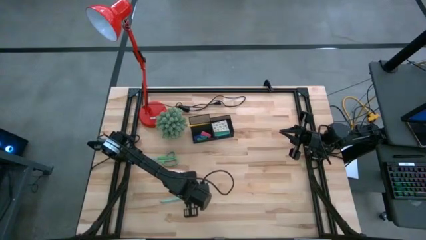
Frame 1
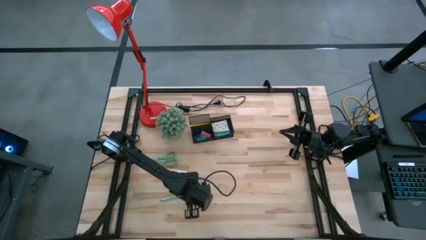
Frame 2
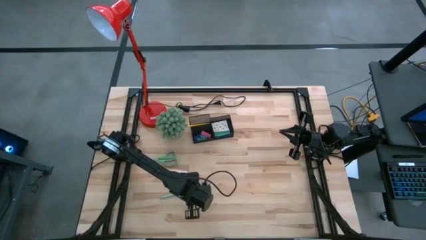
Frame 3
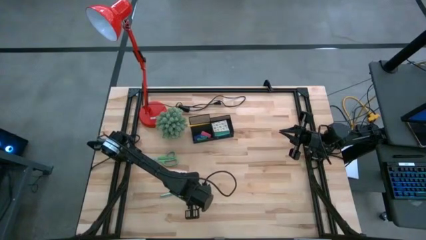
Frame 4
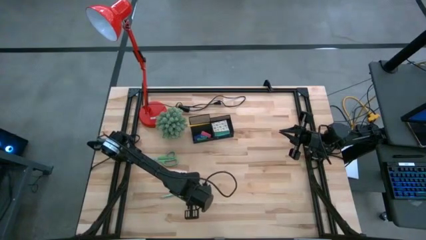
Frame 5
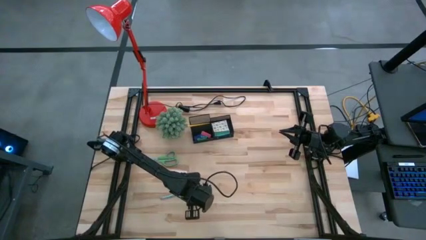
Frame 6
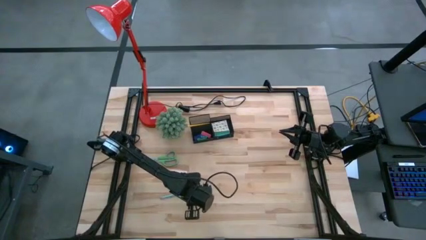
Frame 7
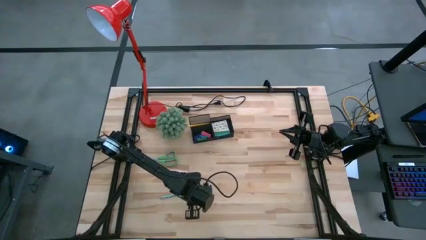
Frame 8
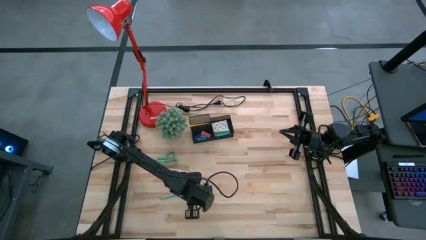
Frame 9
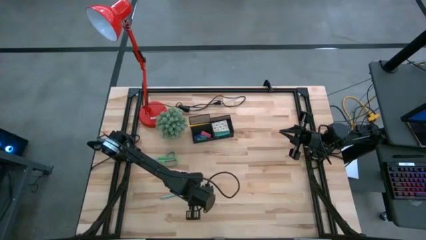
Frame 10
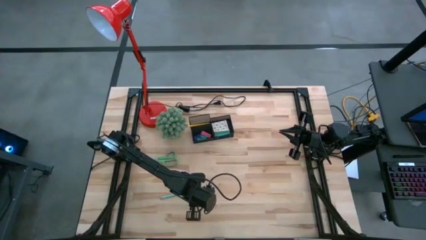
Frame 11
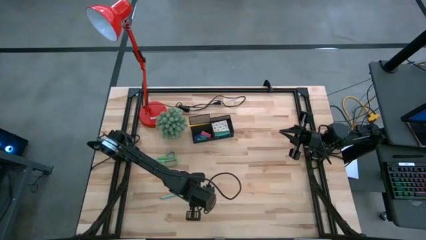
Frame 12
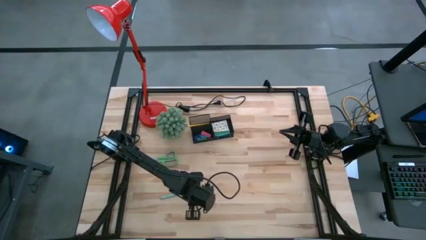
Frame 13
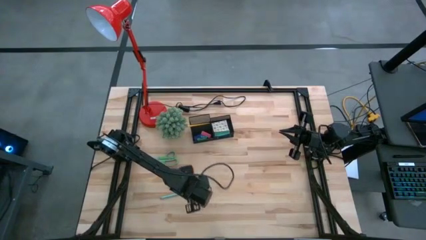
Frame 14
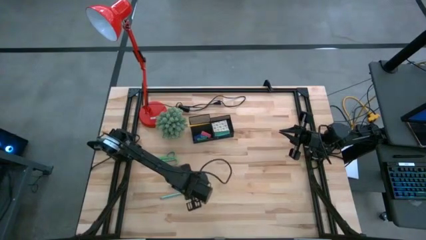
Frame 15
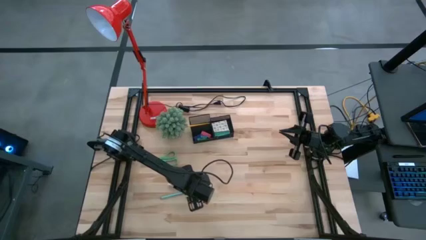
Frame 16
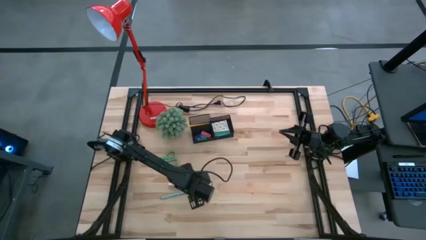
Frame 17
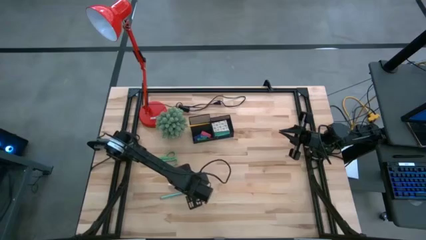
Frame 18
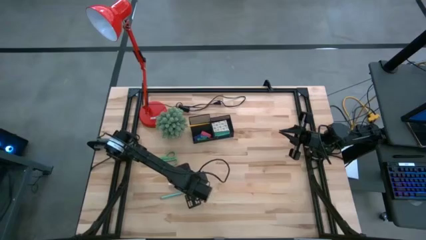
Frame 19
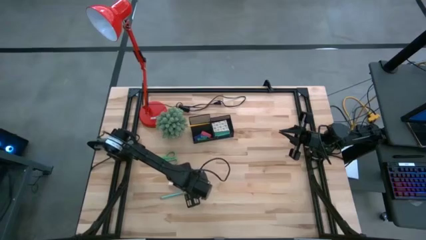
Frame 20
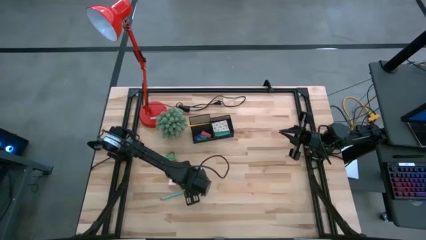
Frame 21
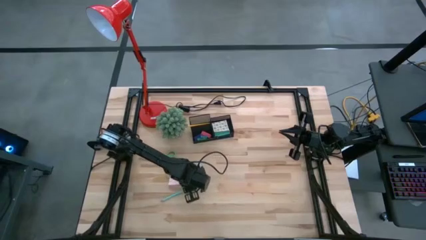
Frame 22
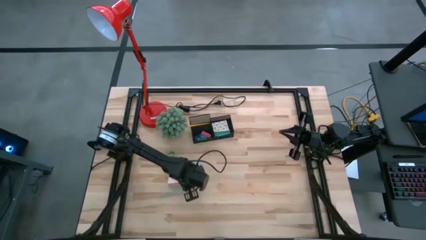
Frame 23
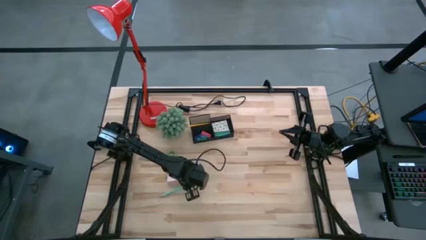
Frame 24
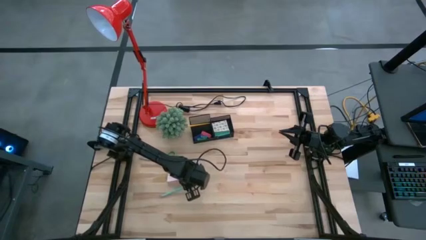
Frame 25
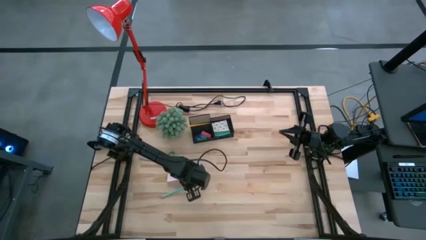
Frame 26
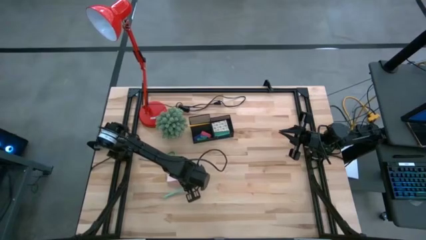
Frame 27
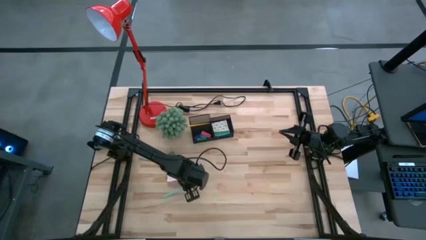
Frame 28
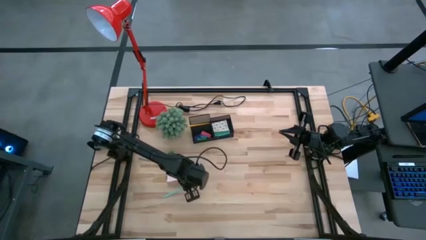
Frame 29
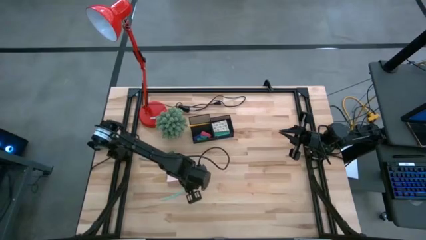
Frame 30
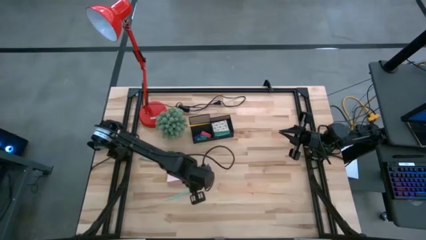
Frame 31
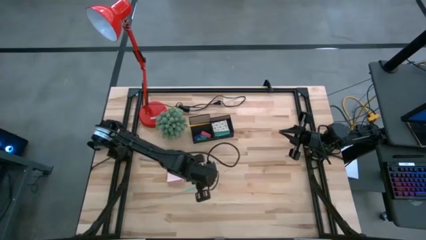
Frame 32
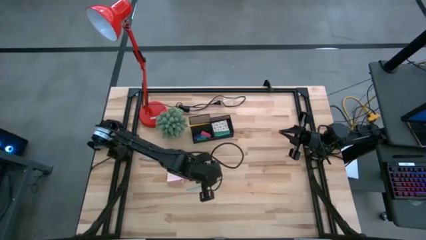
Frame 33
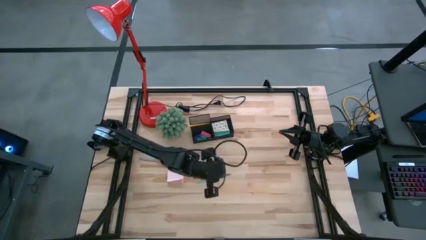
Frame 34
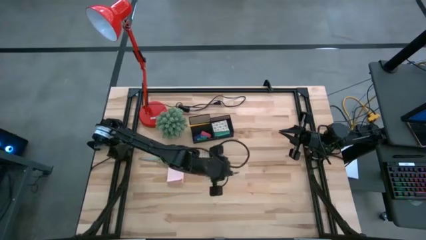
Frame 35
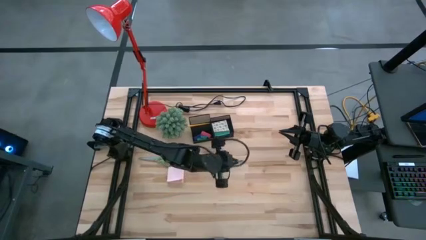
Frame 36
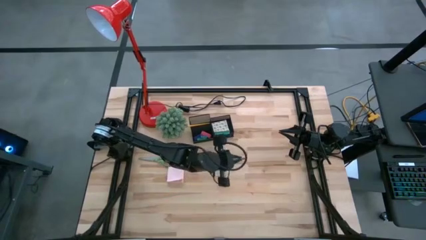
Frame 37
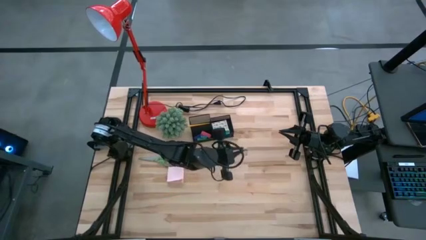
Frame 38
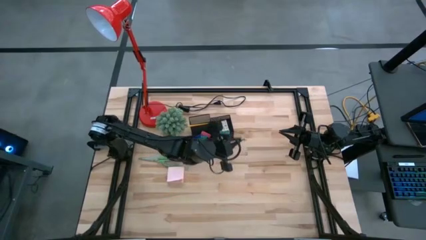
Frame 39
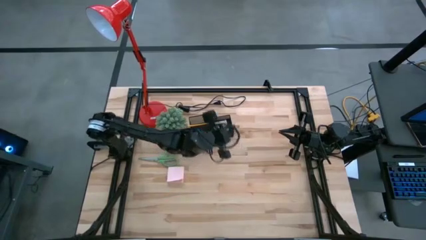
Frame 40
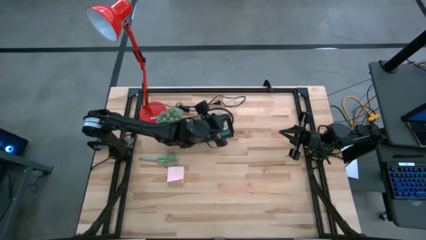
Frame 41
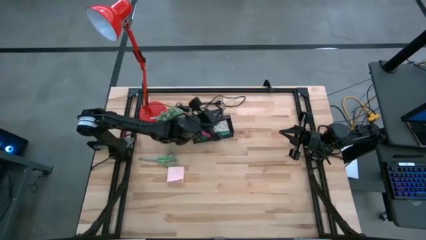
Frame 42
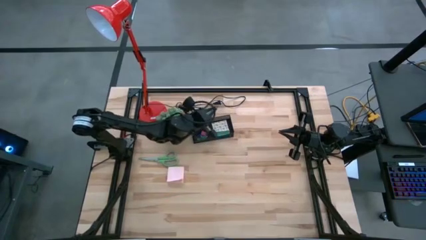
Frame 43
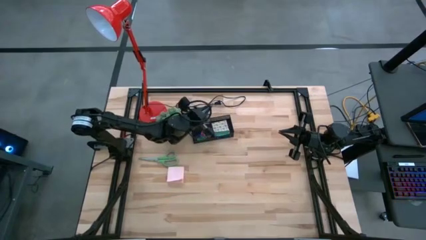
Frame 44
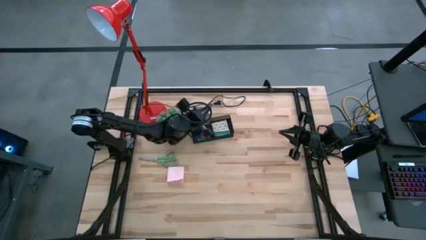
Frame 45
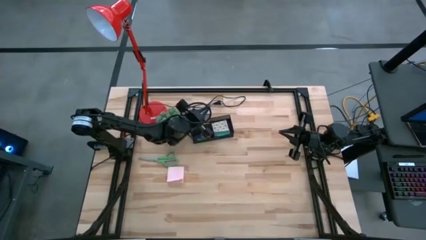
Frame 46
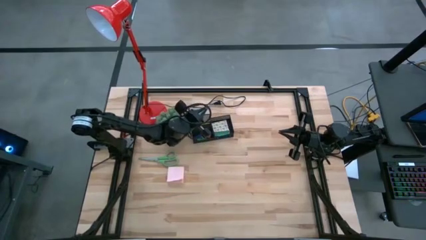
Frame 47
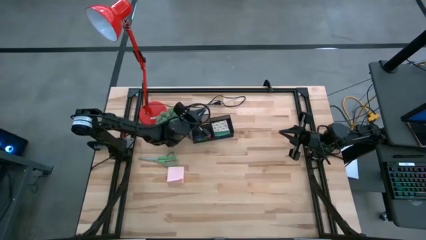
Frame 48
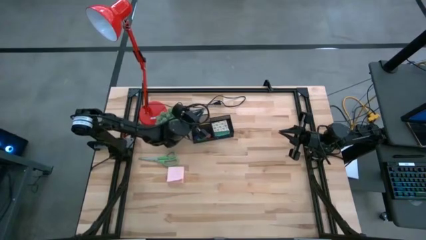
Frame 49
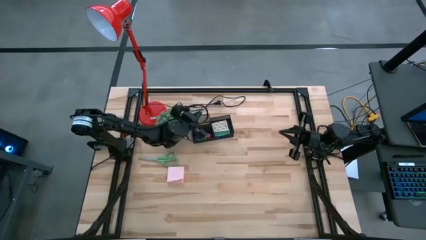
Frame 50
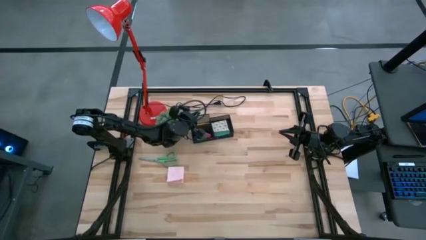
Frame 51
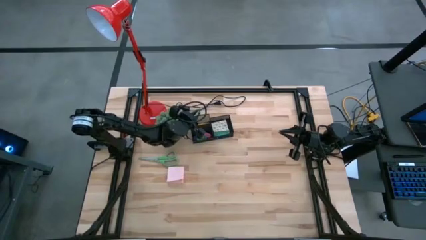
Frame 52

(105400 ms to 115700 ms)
Task: Pick and place office supplies into organizer
Put the blue pencil into the desk organizer

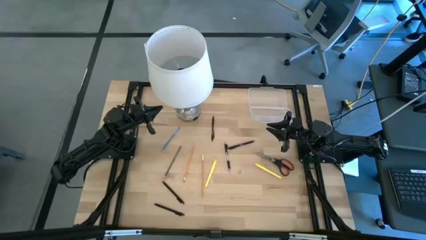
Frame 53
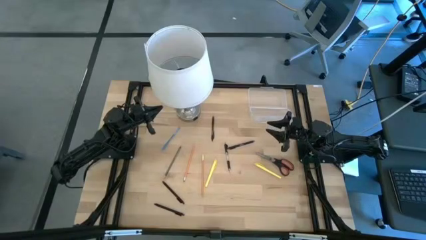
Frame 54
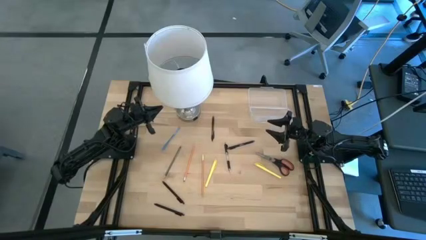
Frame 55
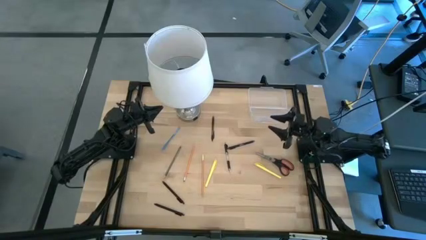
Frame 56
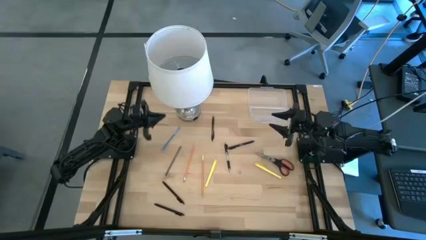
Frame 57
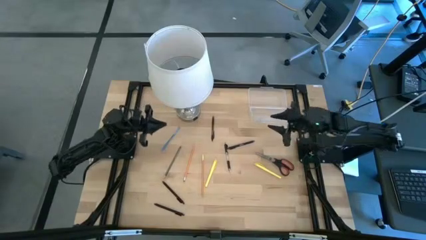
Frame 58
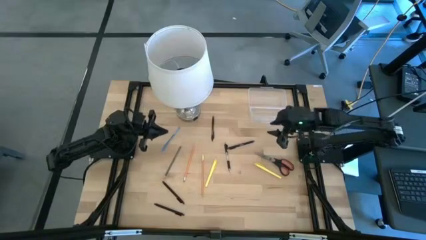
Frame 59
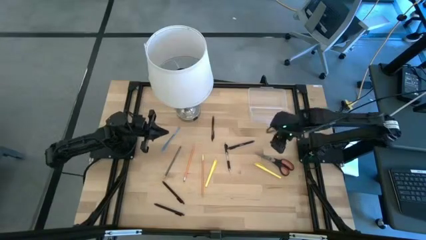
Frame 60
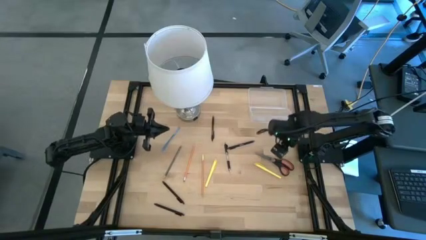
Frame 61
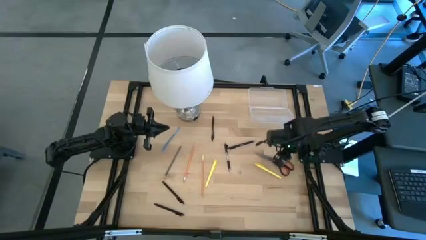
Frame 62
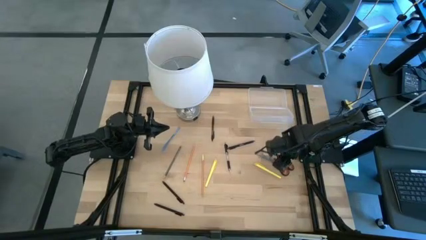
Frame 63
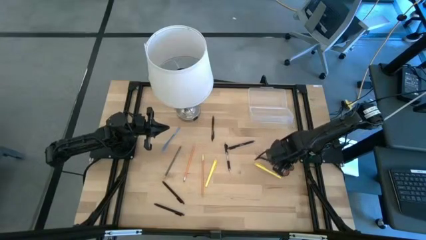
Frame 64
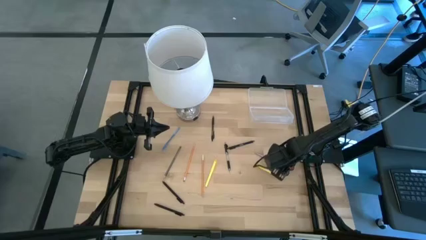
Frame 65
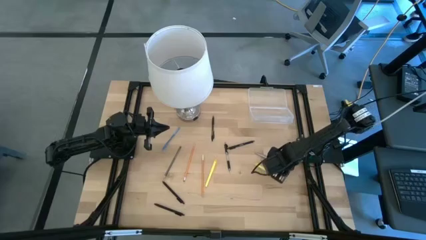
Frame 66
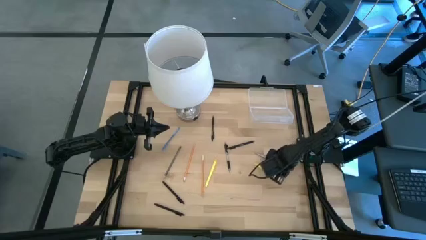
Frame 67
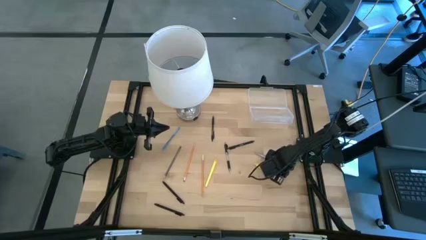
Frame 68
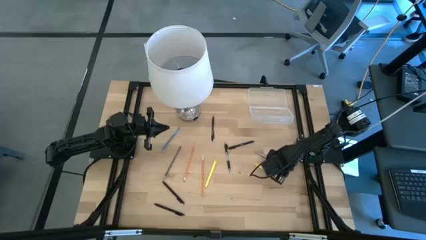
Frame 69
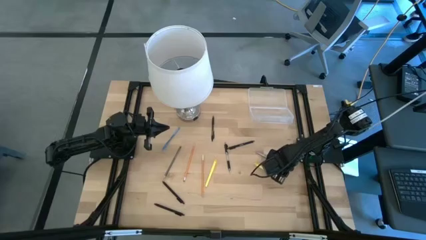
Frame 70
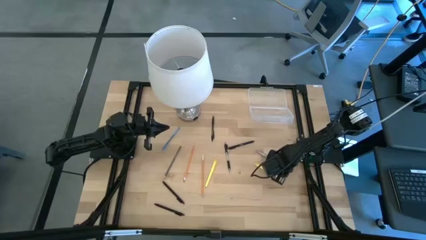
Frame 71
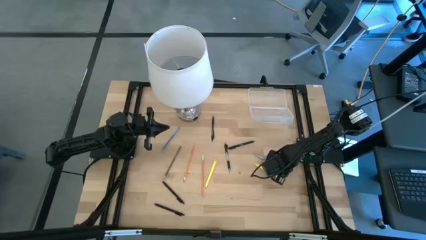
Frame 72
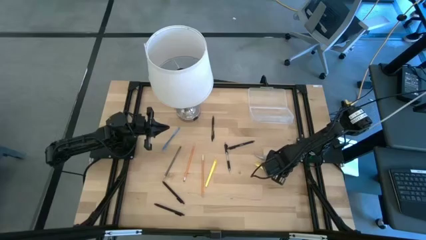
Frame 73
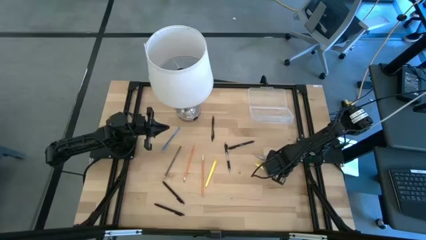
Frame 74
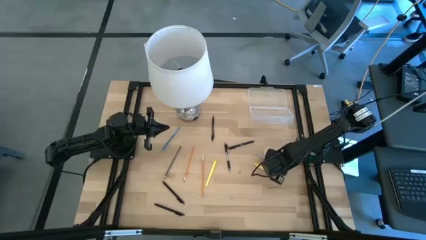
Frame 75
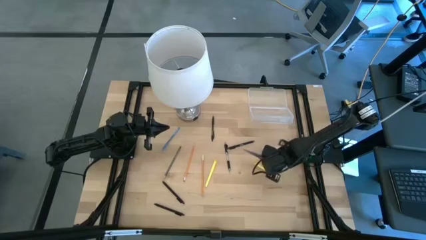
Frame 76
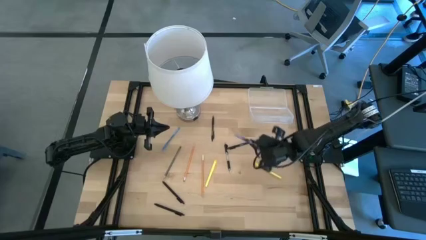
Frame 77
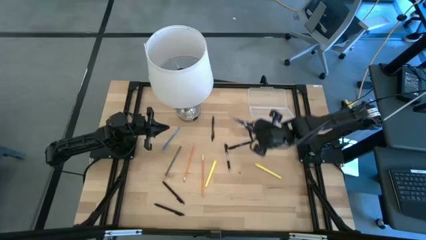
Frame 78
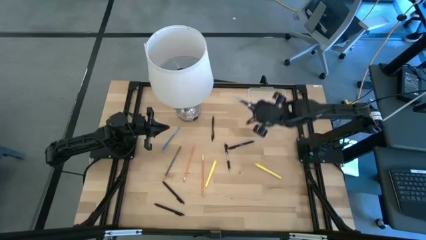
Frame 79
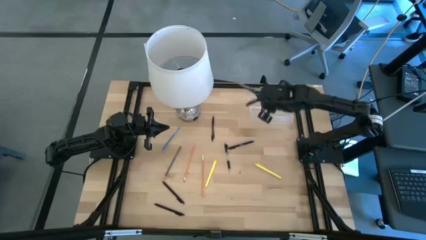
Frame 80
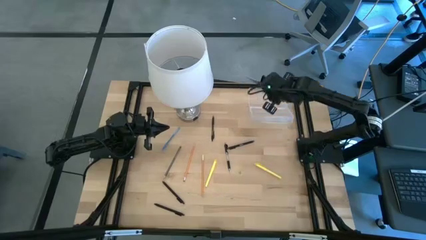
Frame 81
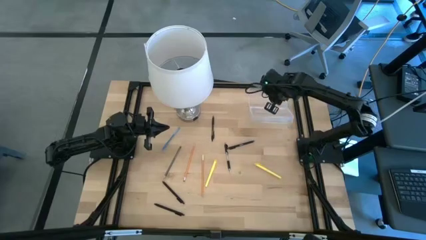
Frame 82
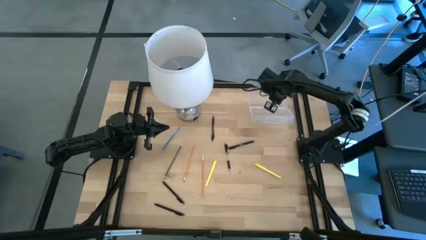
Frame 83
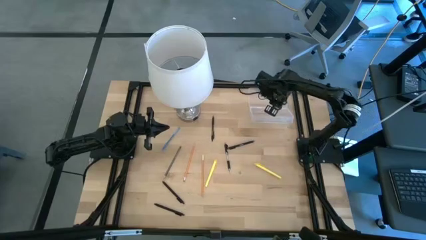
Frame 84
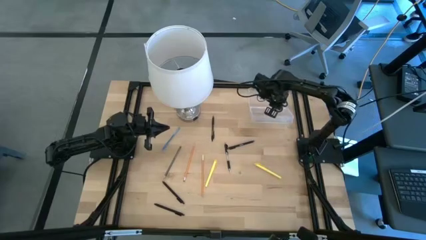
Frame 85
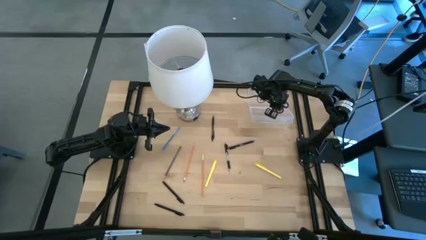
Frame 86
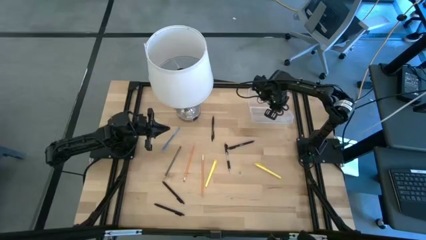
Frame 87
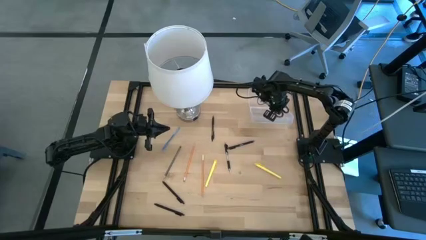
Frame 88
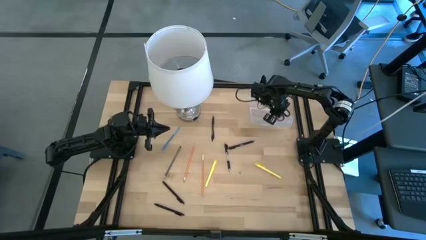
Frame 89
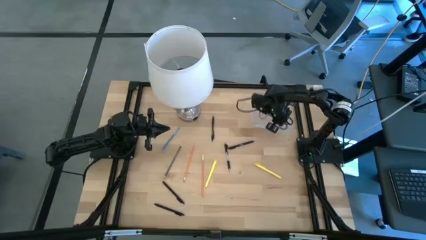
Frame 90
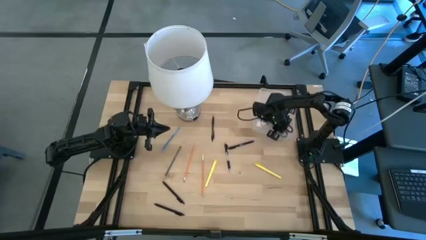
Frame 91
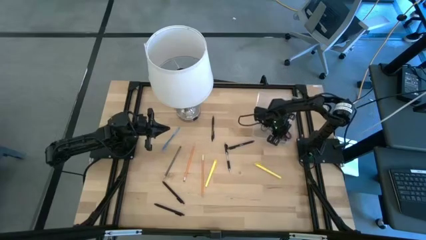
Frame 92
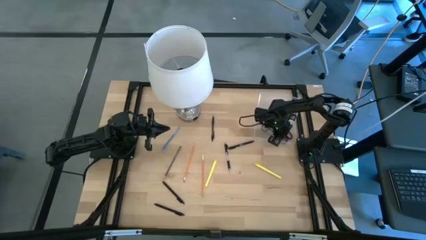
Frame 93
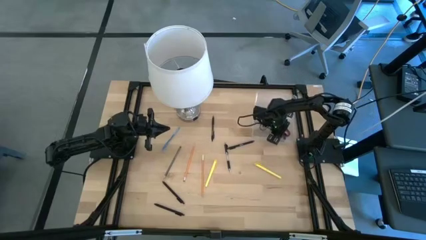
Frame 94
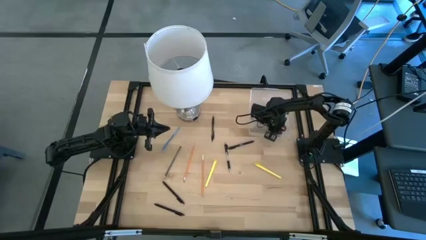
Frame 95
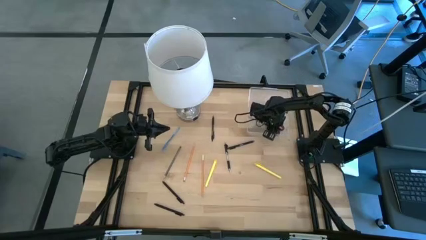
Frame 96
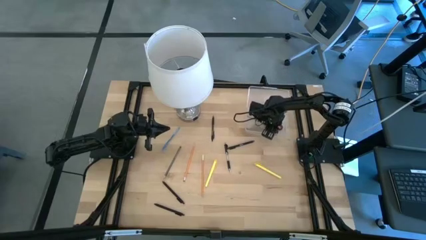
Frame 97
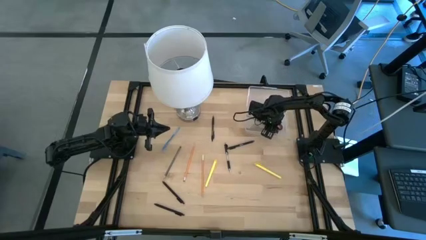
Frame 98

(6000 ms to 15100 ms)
Task: Pick & place school supplies into a supply box
Put the scissors into the transparent supply box
